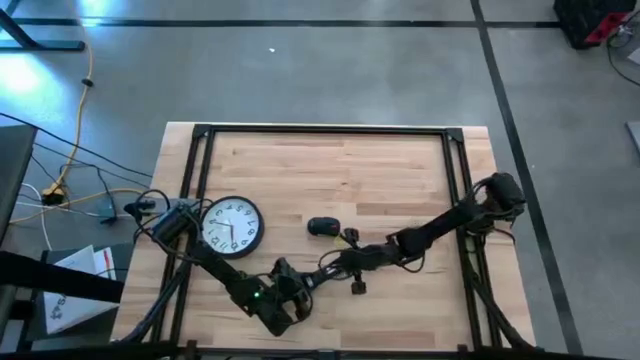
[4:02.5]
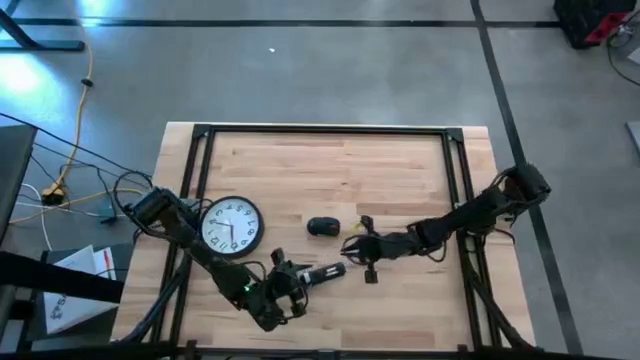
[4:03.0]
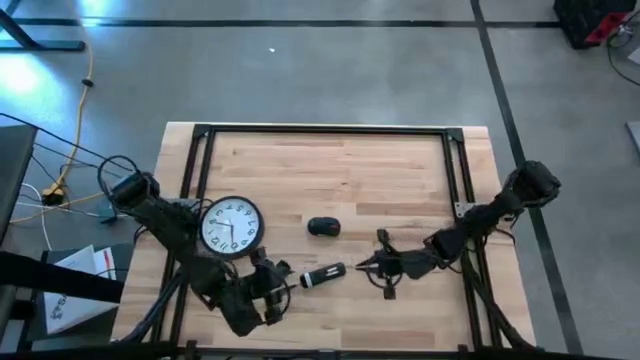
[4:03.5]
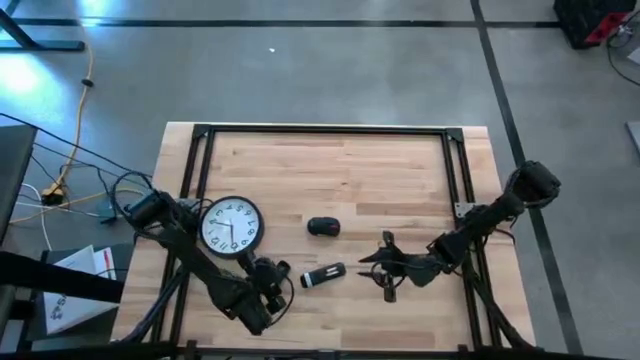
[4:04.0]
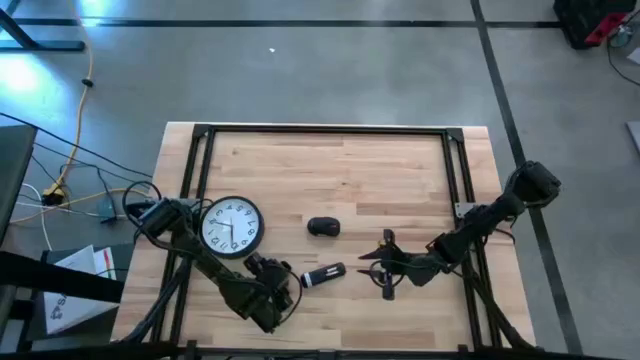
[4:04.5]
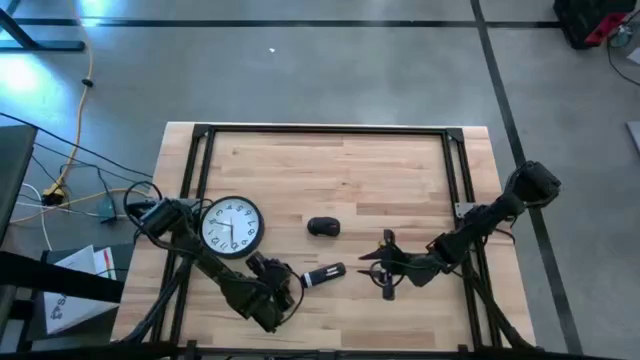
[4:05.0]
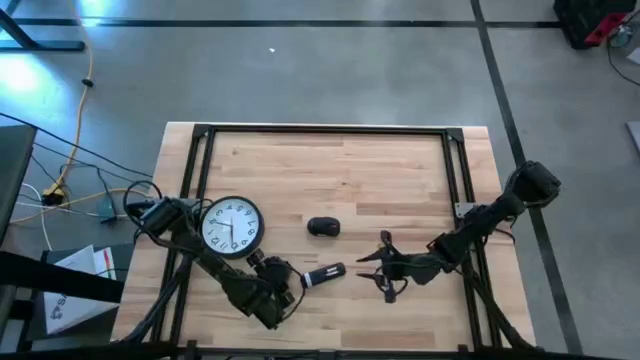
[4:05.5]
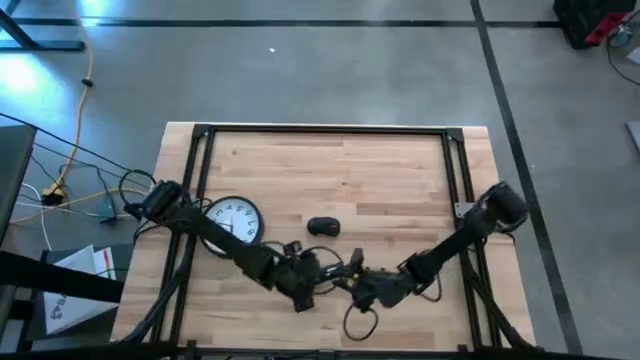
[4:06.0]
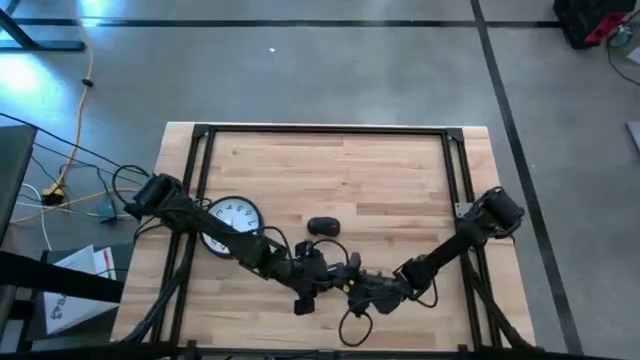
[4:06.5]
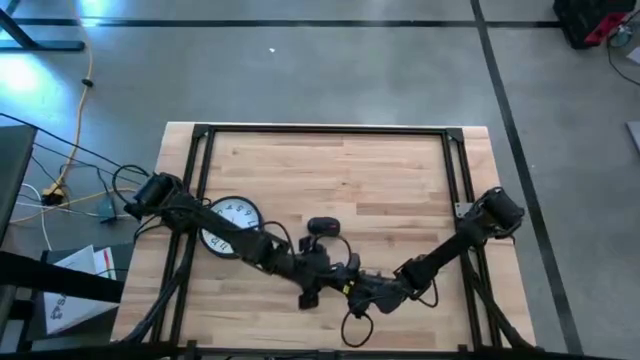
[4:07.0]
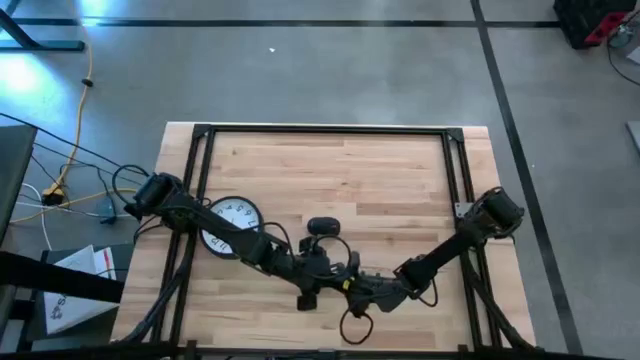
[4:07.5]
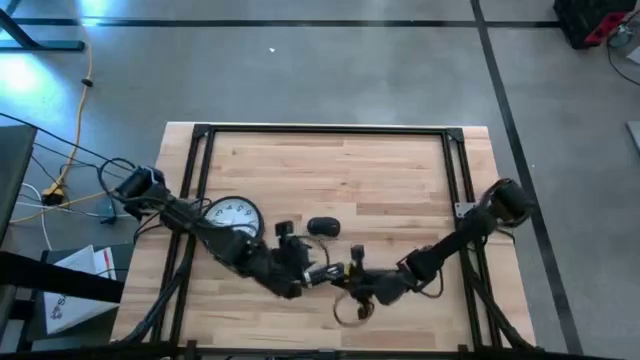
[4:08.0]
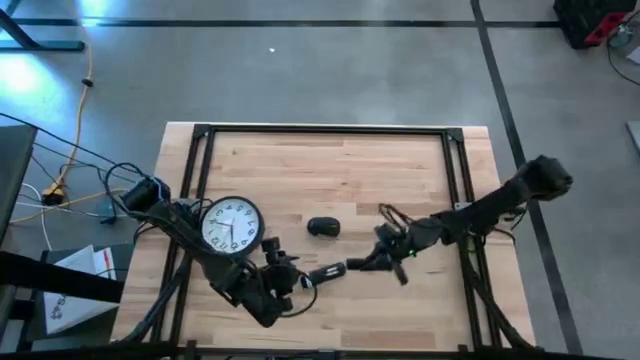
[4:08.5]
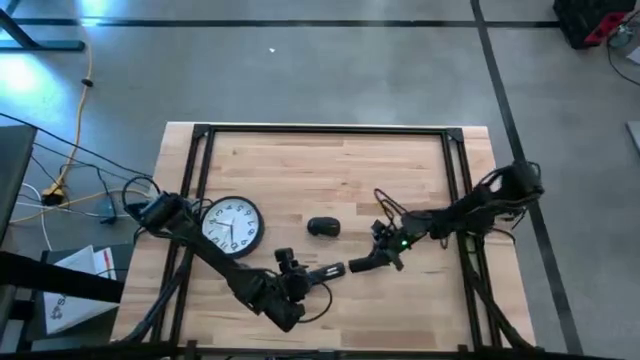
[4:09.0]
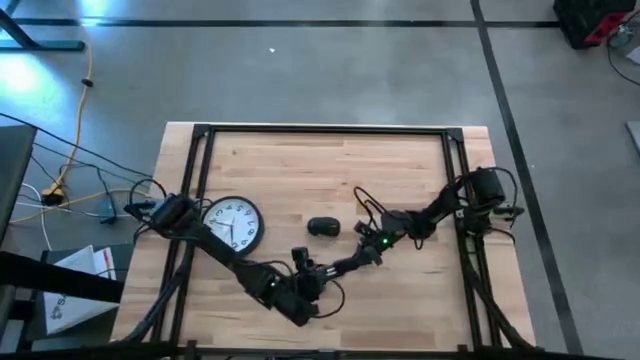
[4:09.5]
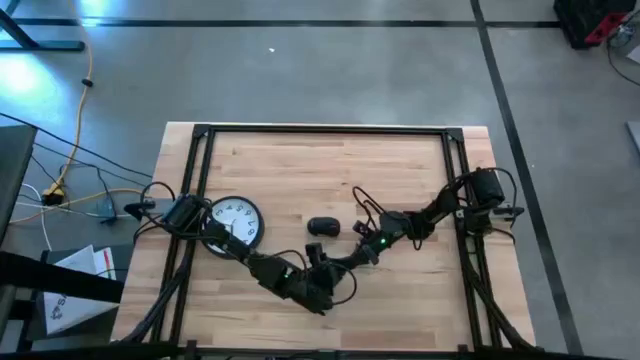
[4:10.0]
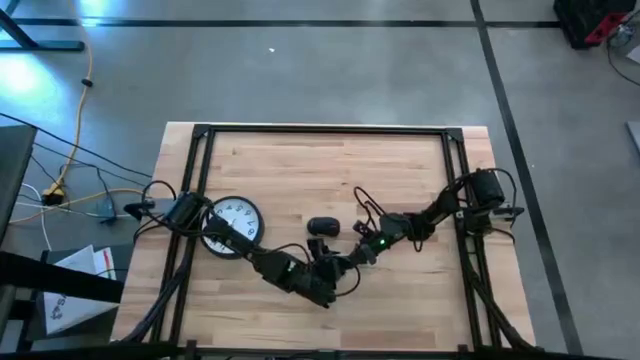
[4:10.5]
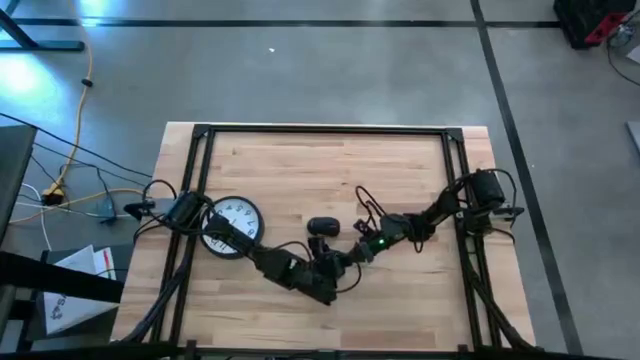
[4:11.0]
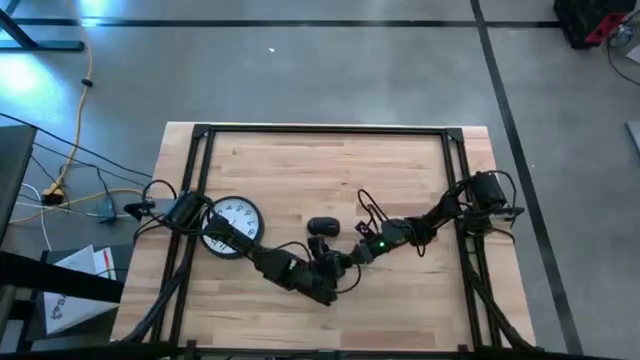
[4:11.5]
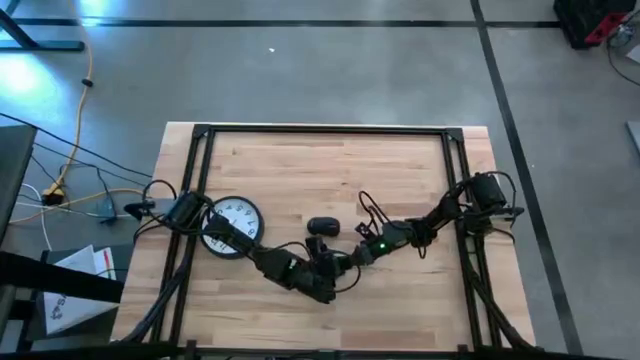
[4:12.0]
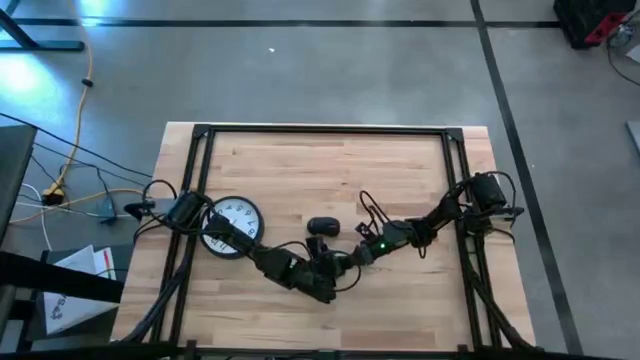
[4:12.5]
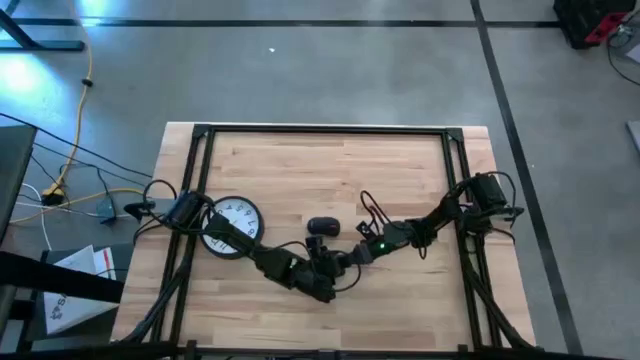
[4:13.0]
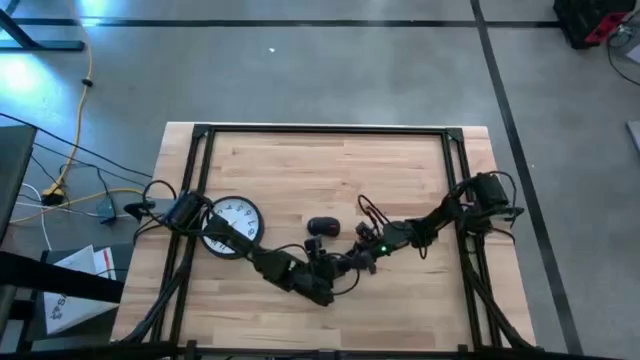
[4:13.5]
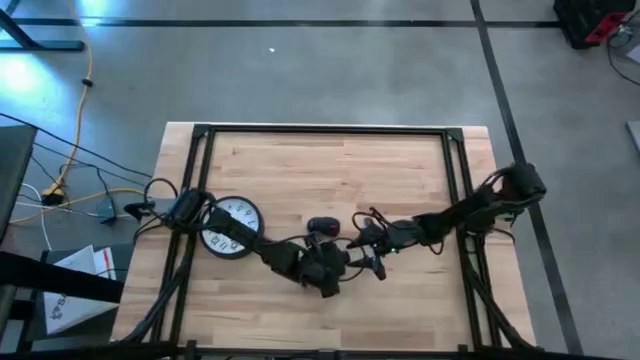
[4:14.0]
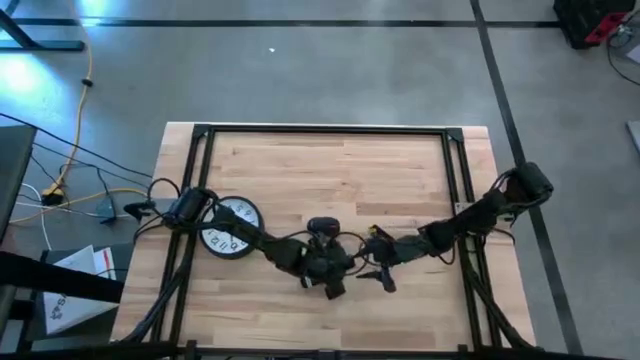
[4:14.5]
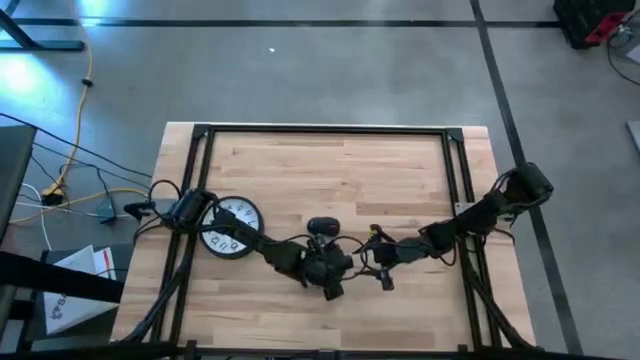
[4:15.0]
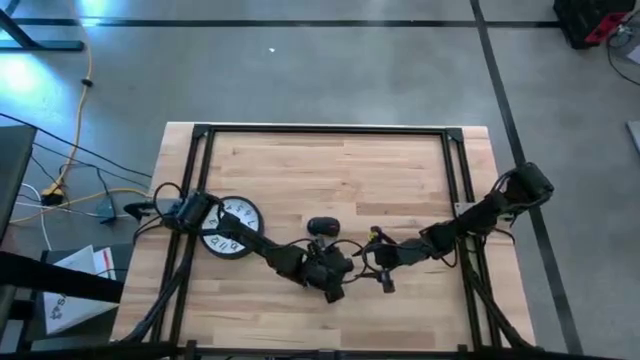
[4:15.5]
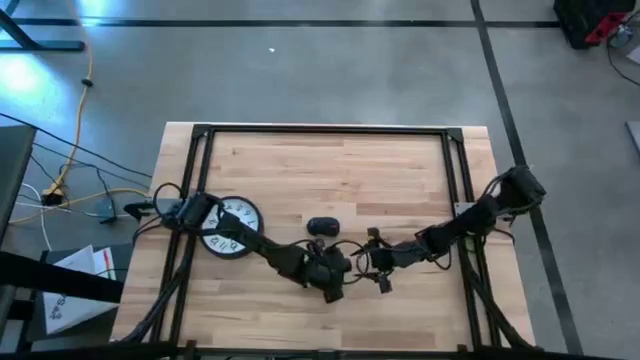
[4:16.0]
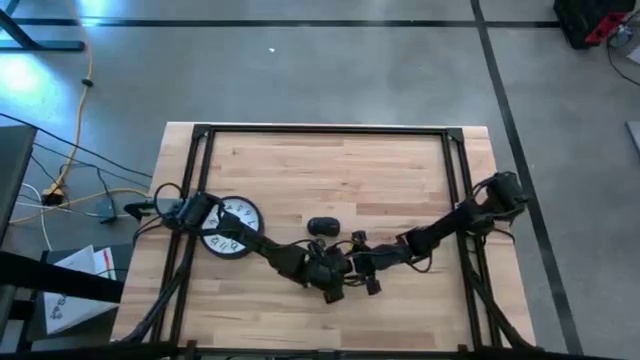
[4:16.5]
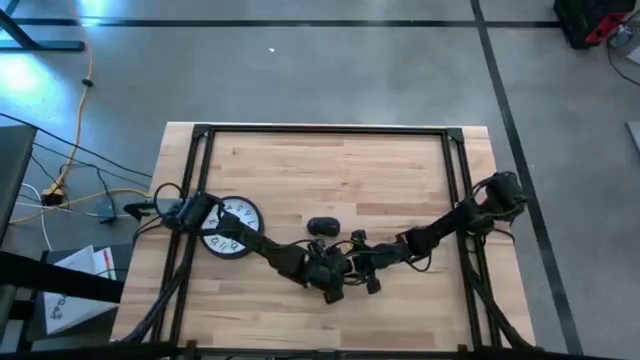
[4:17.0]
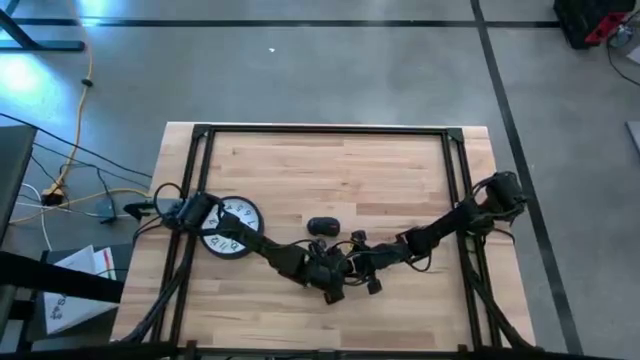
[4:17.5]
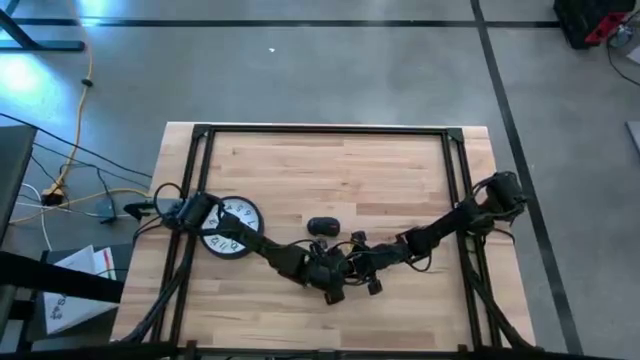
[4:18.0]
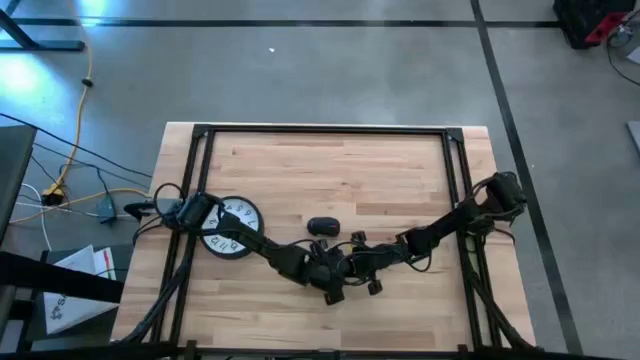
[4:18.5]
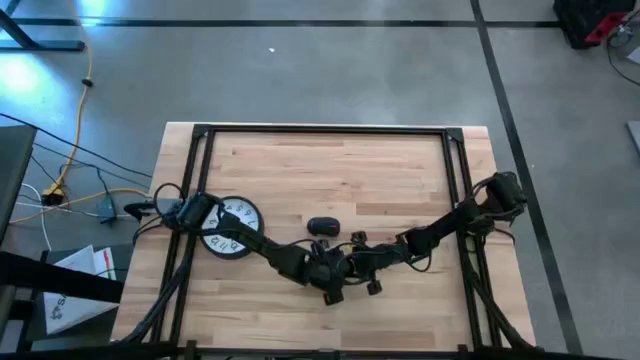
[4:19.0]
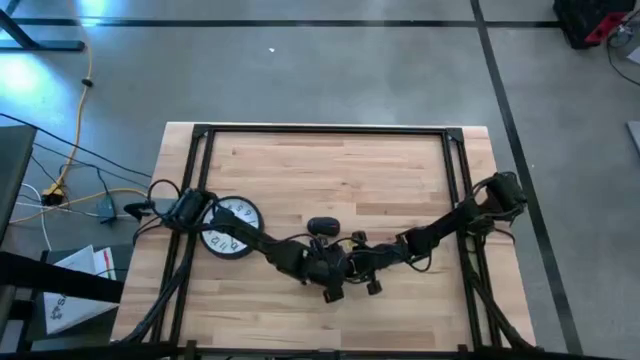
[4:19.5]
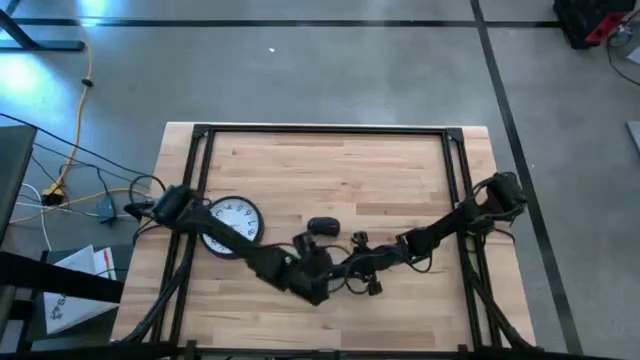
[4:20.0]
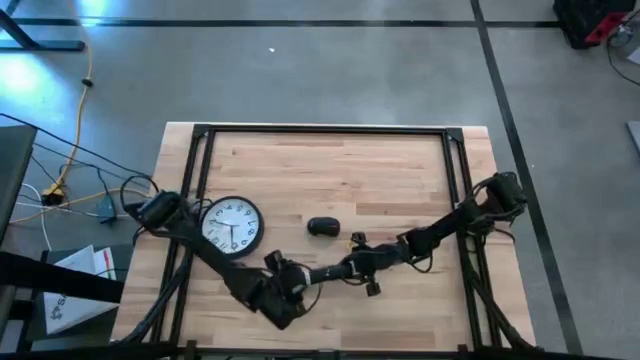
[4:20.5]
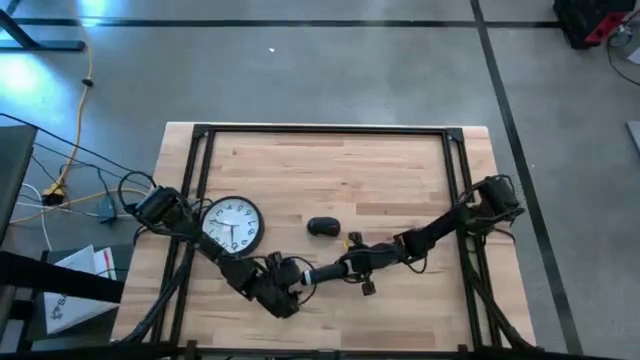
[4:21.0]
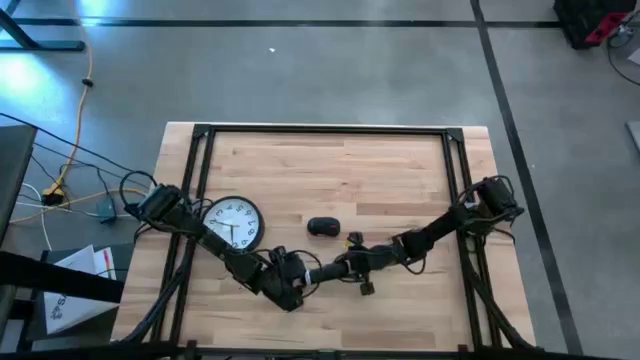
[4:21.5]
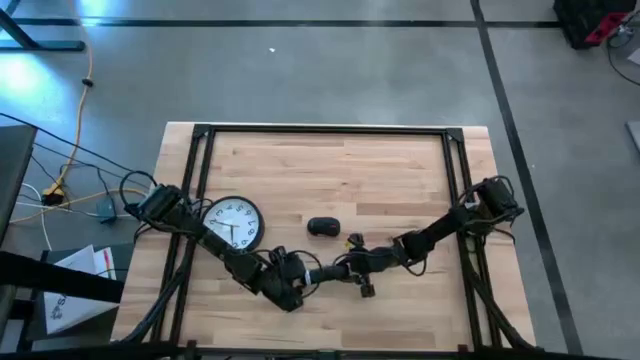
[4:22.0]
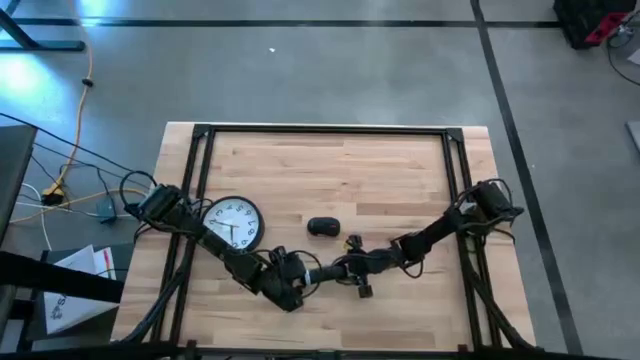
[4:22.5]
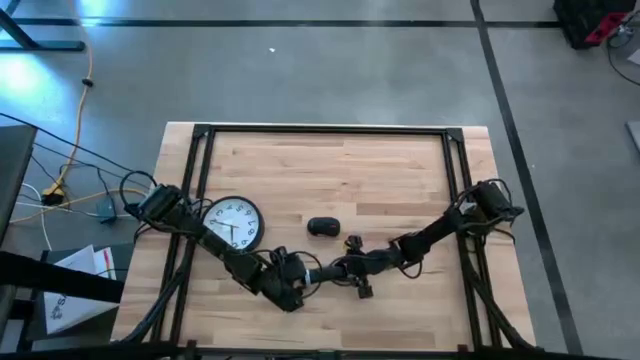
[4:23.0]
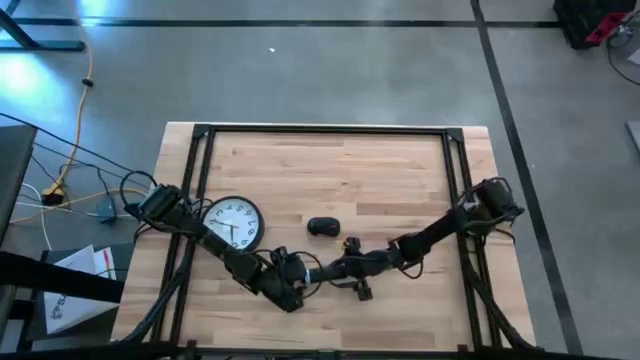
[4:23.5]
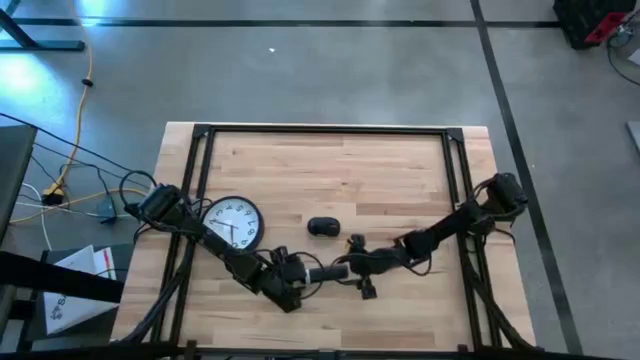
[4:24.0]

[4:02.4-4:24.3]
Task: Insert battery
Close the black remote battery compartment

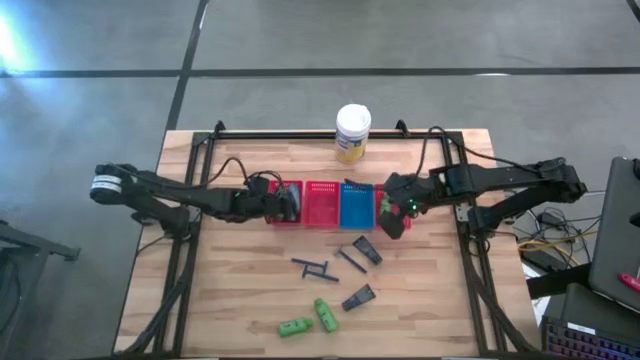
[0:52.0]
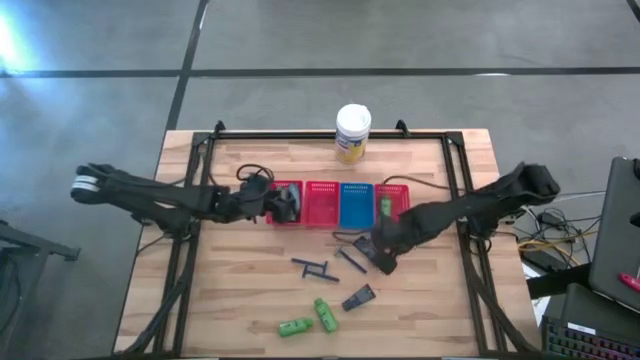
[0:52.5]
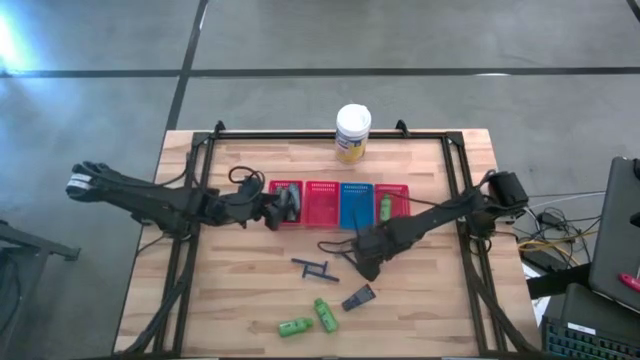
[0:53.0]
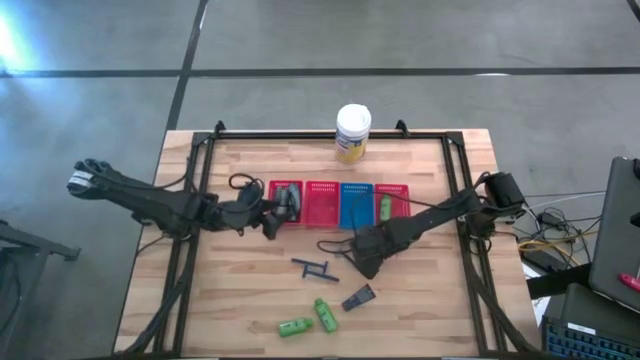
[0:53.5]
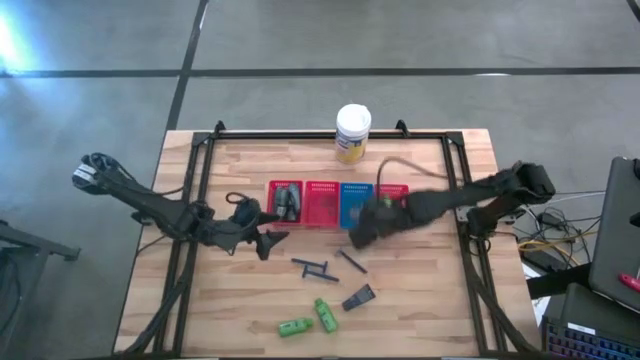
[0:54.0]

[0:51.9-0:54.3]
Task: Pick & Place Travel size toiletries
Put the blue shave cream into the blue bin
